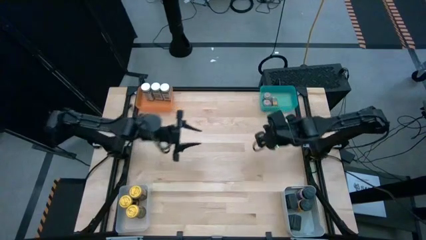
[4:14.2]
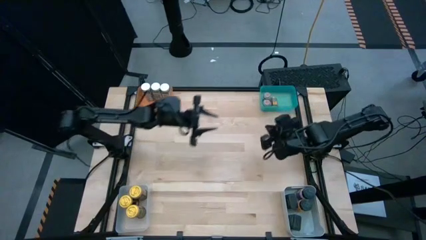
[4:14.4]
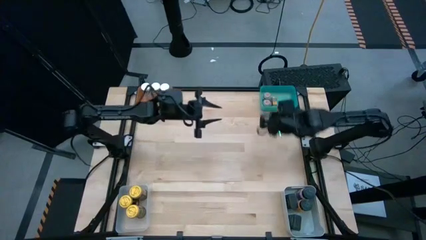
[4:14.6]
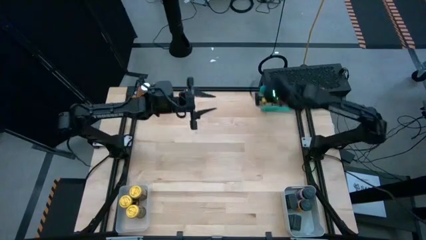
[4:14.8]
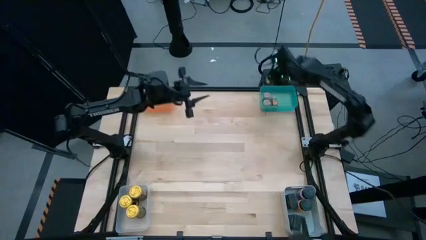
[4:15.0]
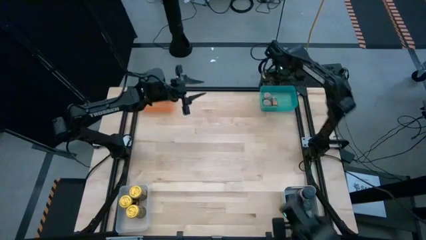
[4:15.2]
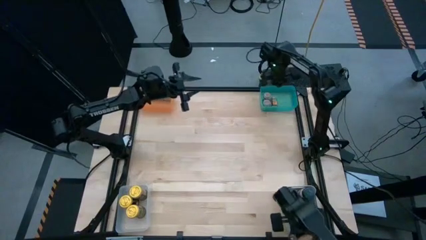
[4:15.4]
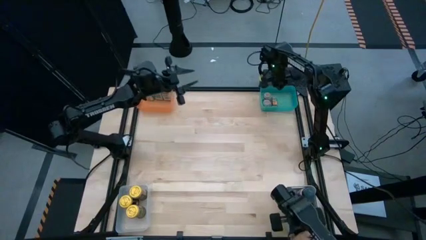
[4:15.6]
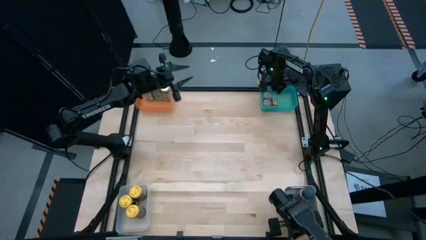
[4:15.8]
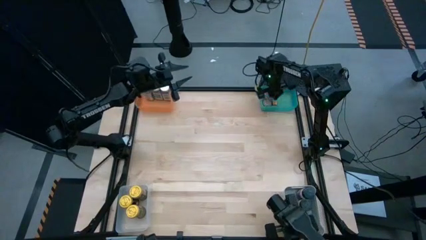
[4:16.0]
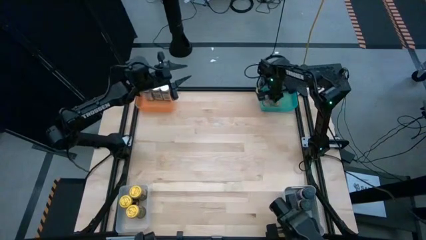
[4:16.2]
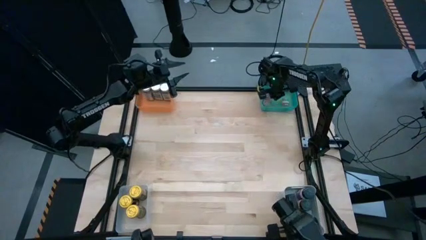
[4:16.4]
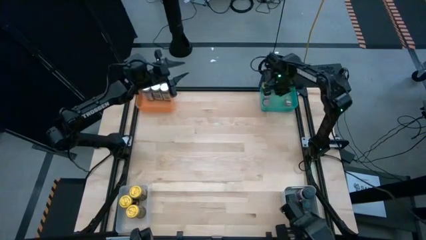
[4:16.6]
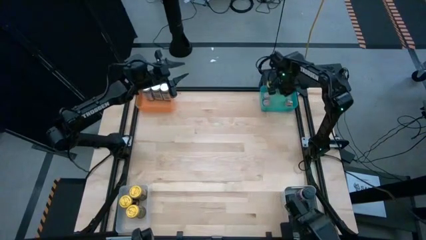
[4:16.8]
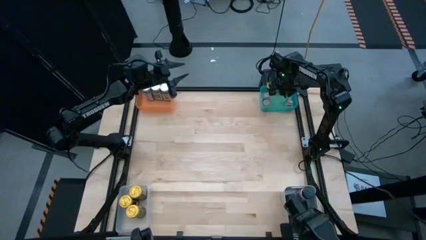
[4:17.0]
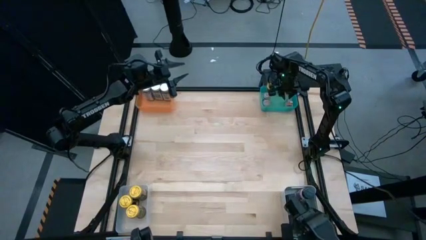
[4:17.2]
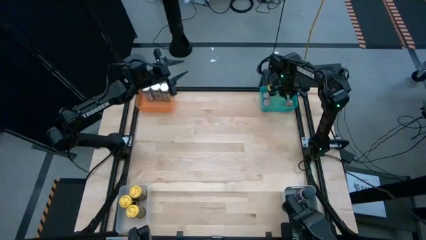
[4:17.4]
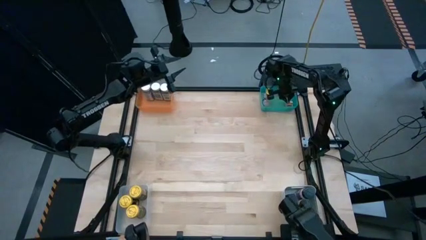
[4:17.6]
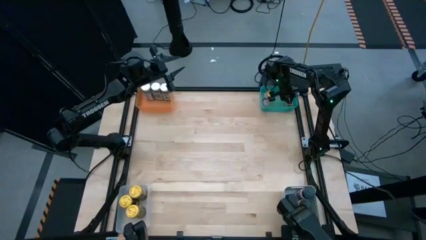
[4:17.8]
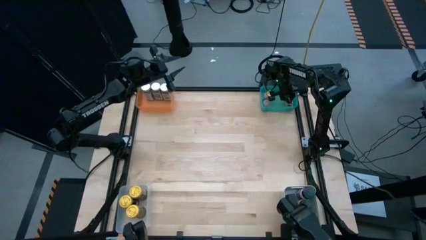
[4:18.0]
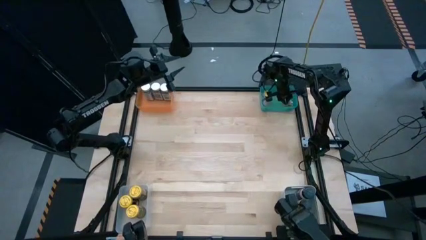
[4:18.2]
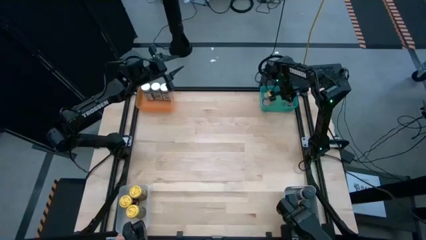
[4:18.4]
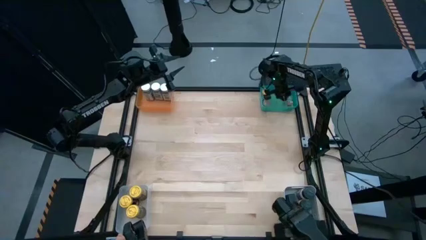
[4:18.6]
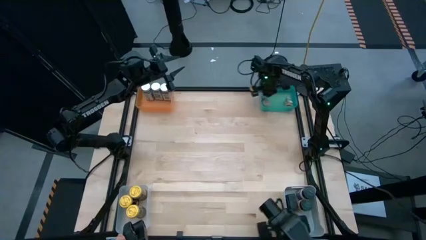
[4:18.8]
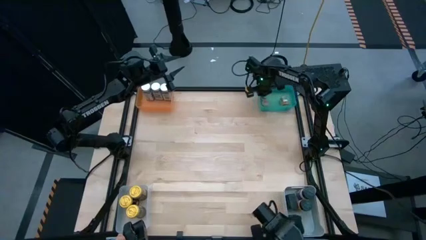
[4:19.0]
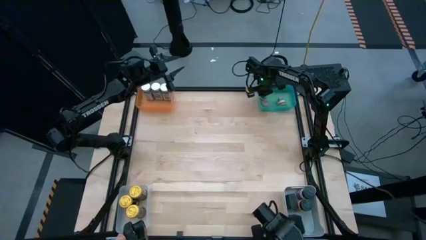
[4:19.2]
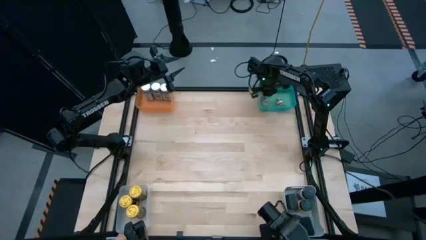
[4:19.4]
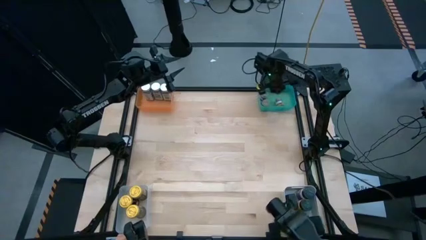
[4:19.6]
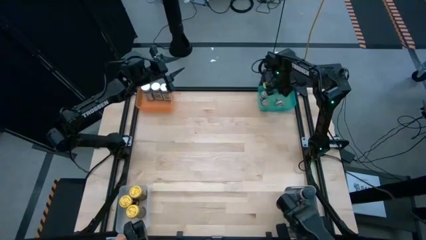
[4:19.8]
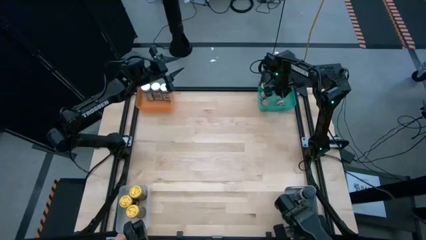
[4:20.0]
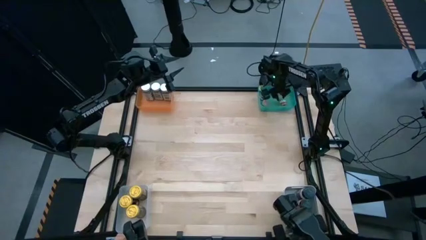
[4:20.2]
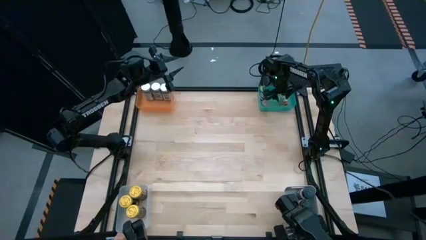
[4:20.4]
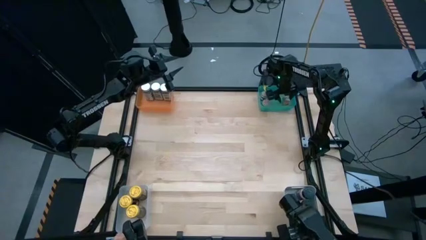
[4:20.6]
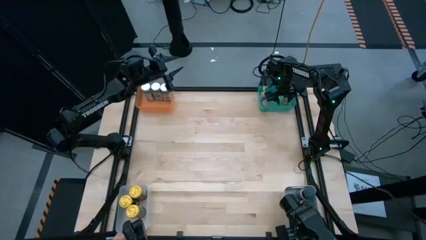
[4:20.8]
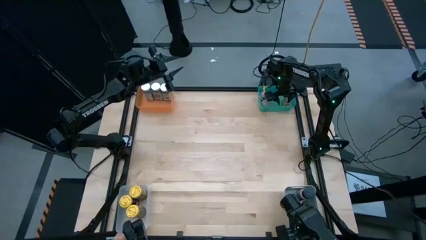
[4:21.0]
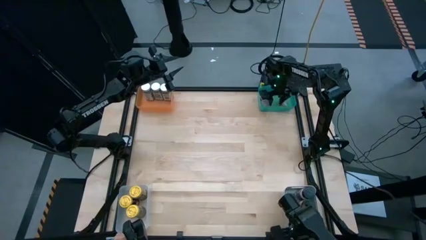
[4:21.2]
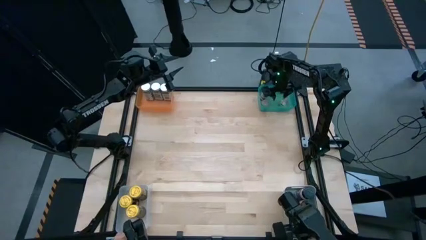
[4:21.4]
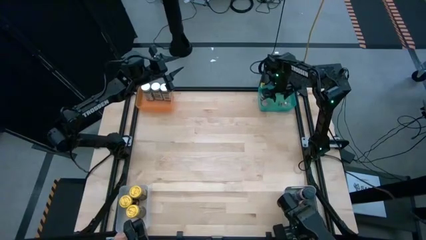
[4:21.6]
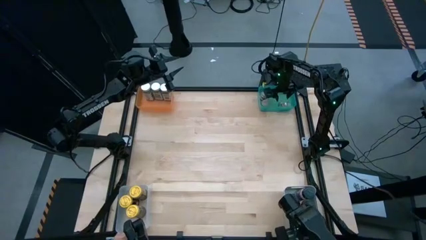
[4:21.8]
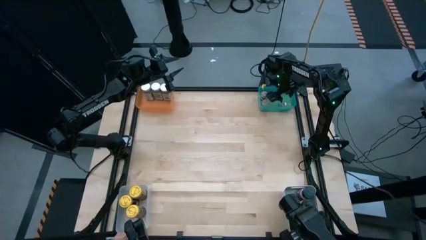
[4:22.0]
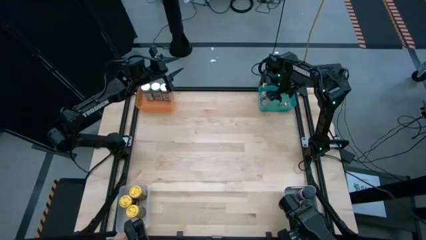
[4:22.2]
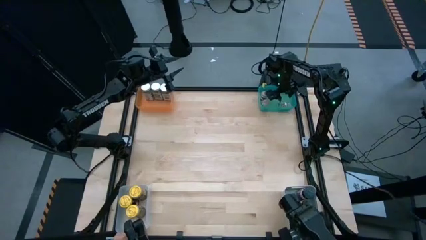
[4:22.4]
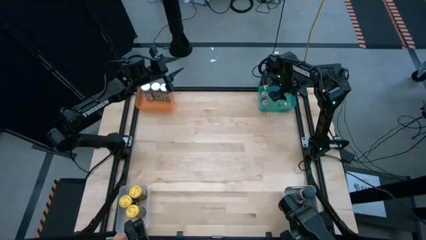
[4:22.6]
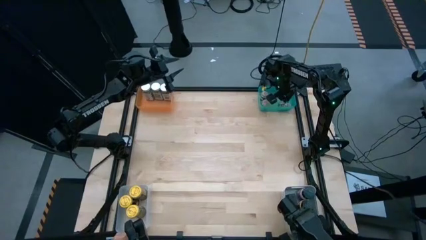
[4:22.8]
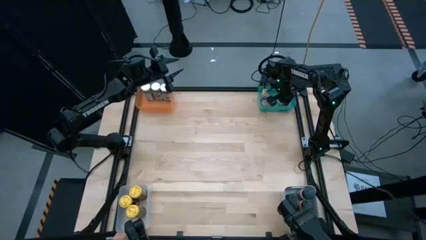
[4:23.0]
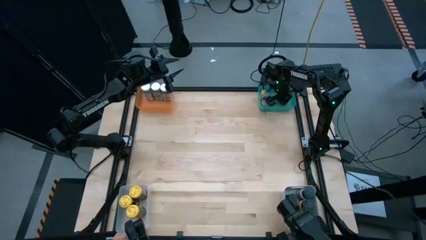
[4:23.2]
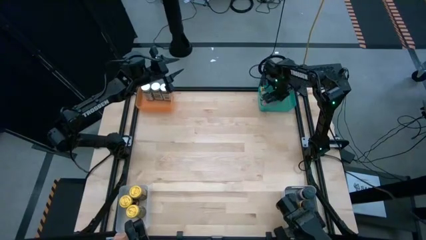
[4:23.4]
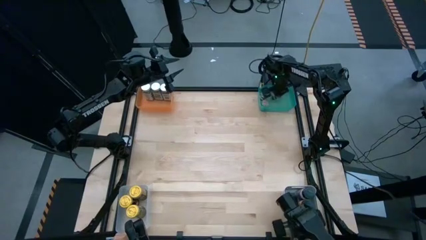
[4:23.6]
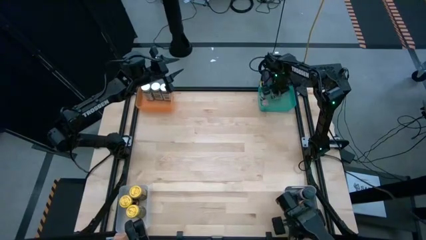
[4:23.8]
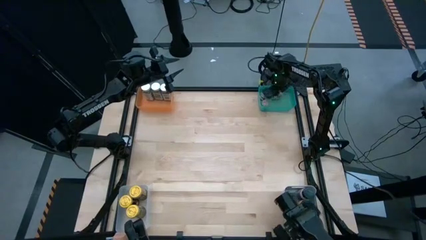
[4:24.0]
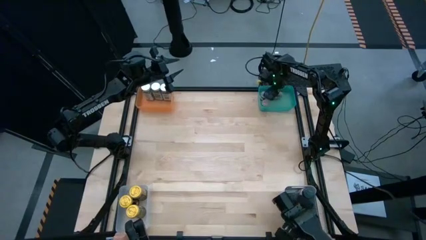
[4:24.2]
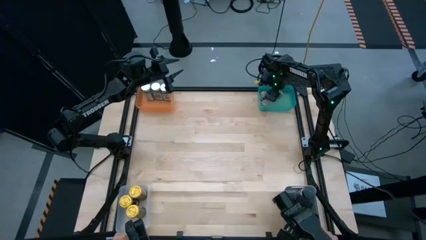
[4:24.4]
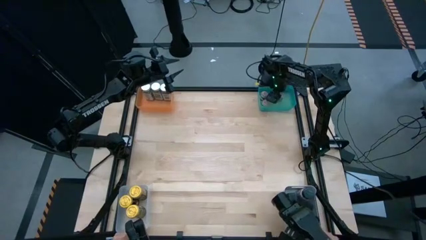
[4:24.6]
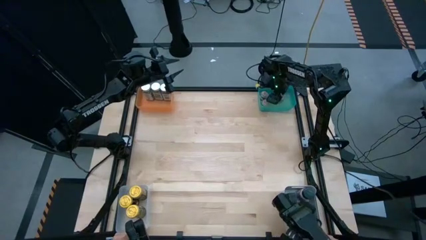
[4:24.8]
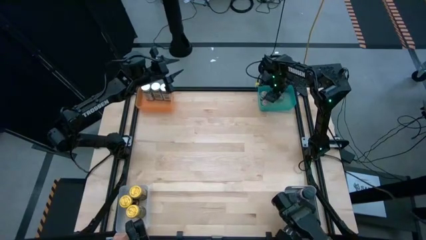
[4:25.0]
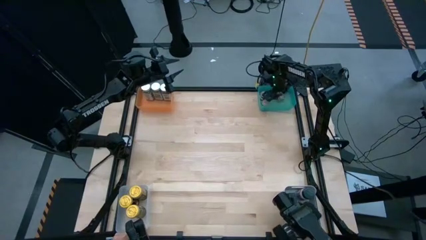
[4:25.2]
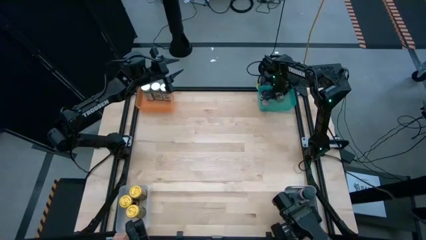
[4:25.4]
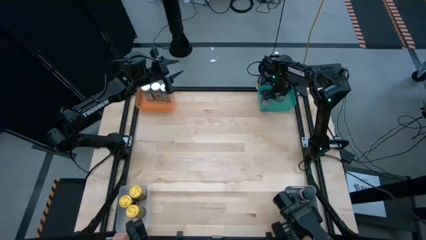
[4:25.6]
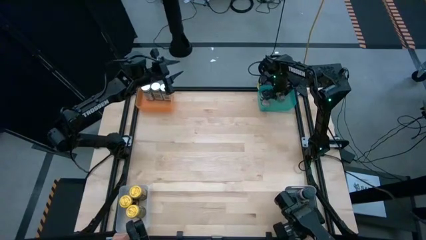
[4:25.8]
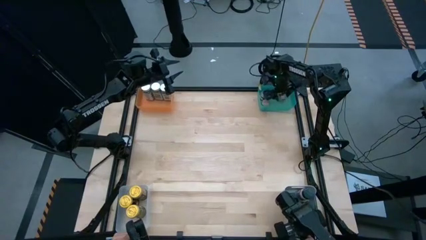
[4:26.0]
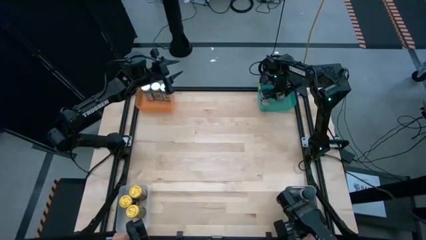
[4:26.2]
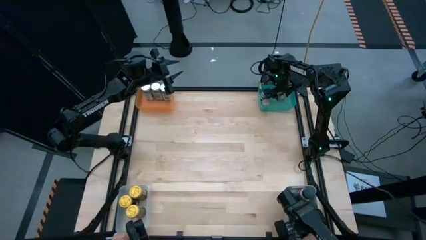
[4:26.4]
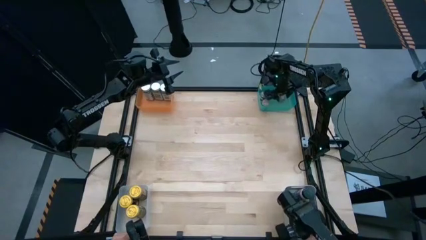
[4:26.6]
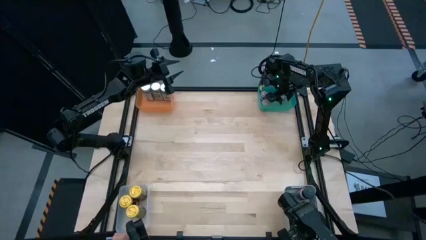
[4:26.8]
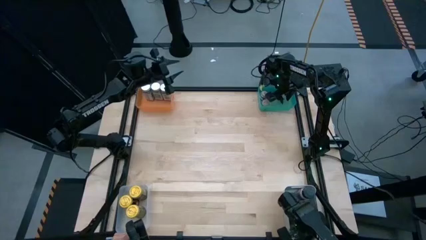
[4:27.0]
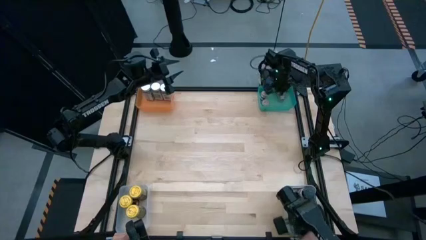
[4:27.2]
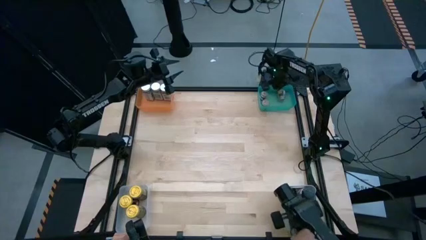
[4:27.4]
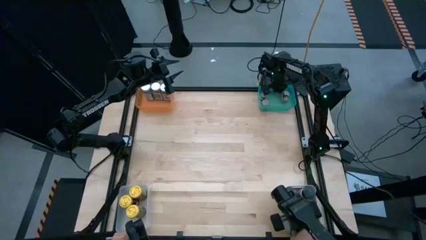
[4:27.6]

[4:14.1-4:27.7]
Task: Sort spices by type
Put the brown seasoning bottle into the blue bin

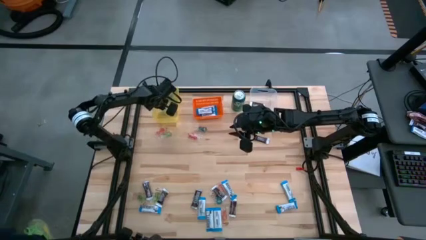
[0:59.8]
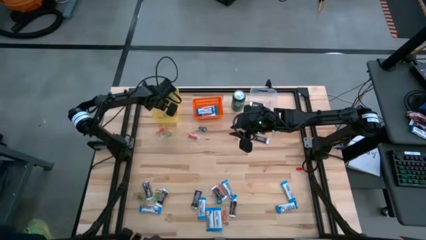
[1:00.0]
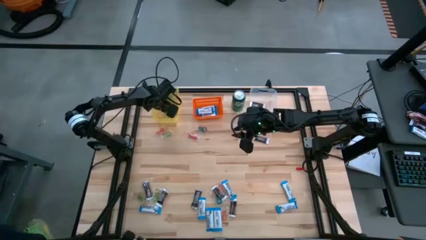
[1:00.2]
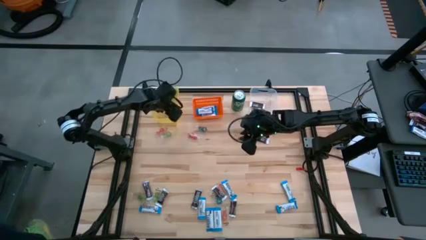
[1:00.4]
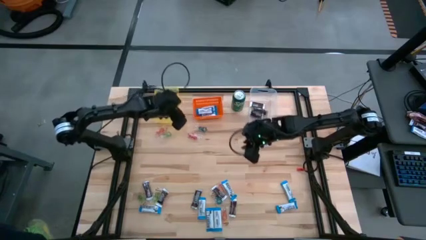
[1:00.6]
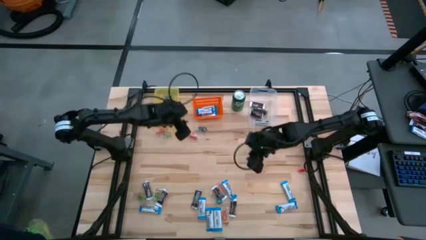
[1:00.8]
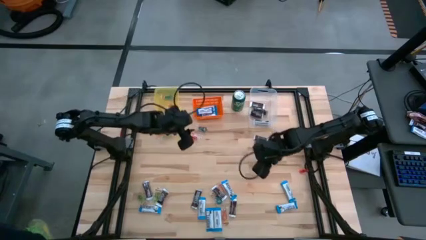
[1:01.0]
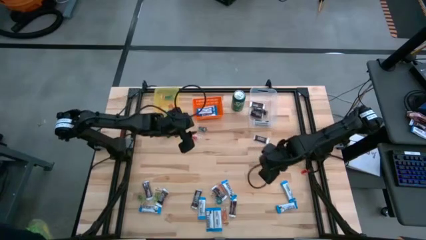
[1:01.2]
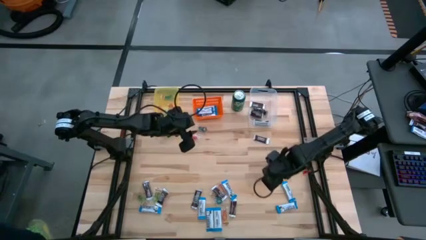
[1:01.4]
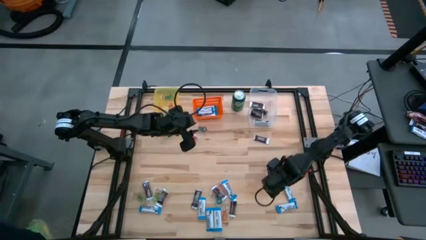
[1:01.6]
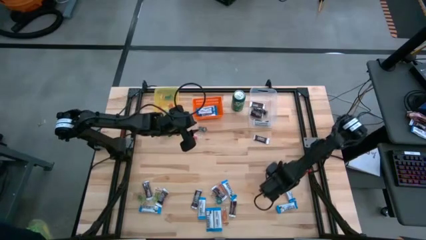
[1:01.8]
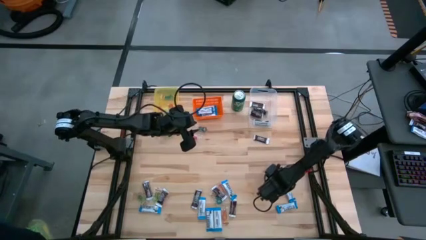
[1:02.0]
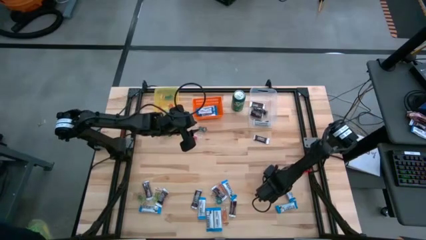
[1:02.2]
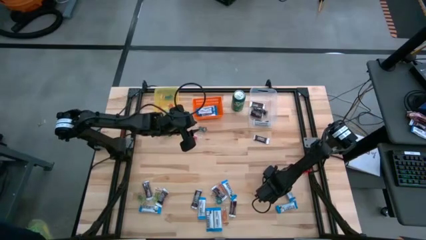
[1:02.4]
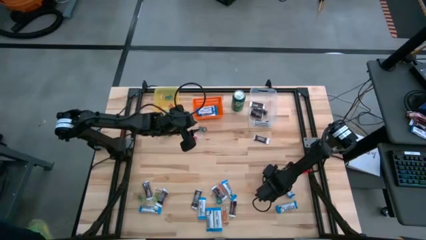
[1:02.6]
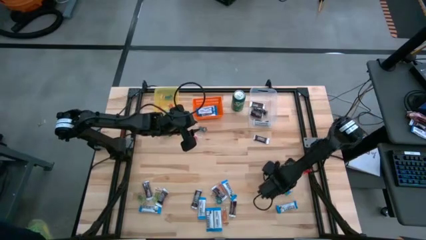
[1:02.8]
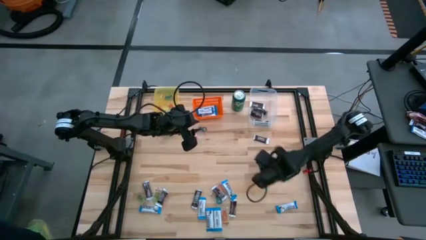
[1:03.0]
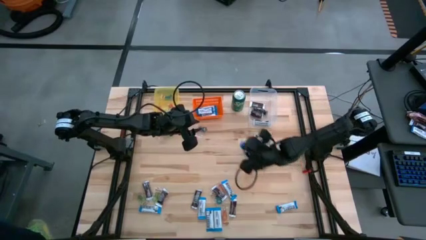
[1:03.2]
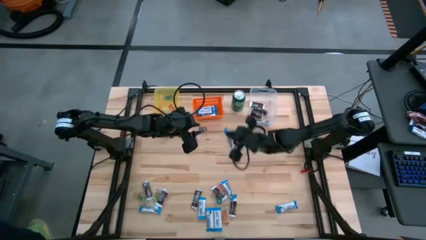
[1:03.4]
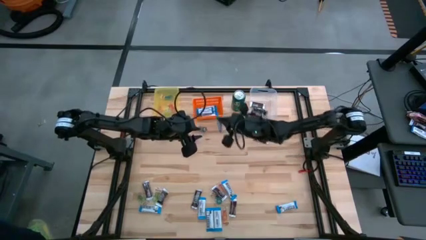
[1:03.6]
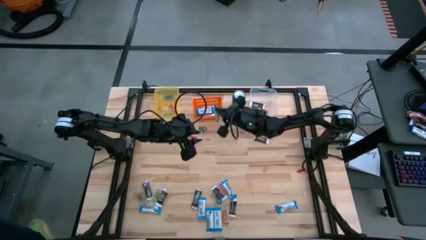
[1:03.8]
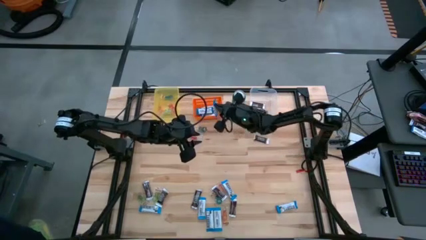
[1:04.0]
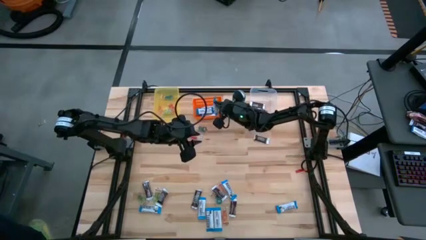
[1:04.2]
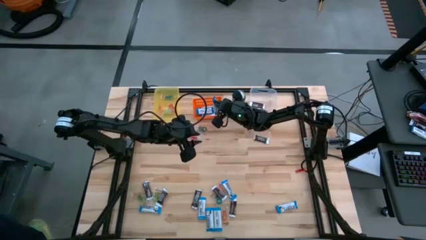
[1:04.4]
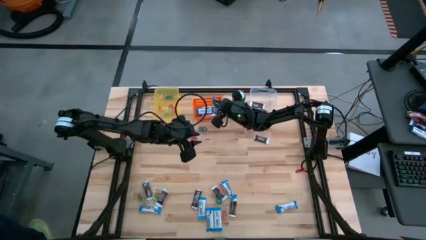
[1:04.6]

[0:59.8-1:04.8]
Task: Organize candy in baskets
Put the white chocolate into the orange bin
